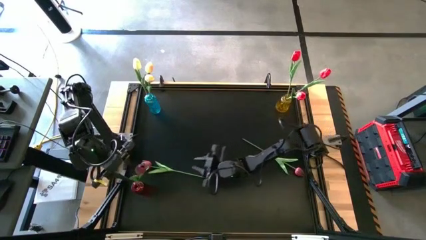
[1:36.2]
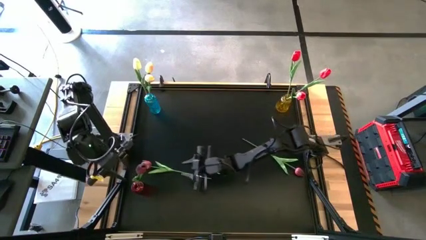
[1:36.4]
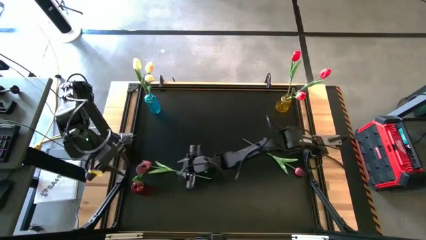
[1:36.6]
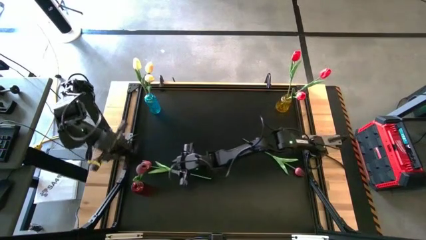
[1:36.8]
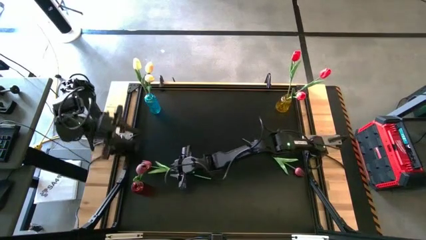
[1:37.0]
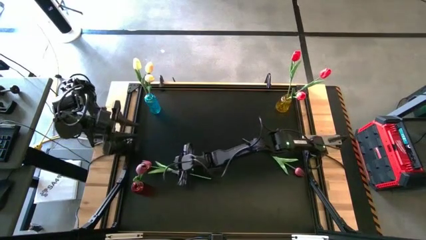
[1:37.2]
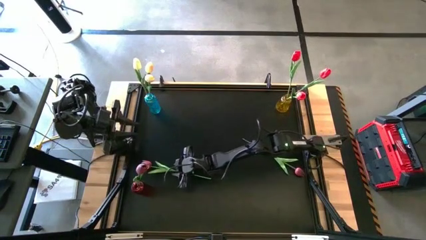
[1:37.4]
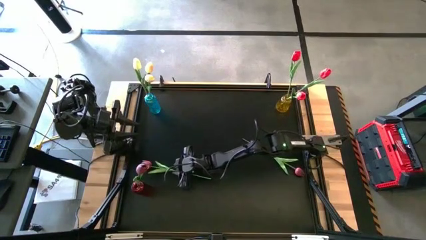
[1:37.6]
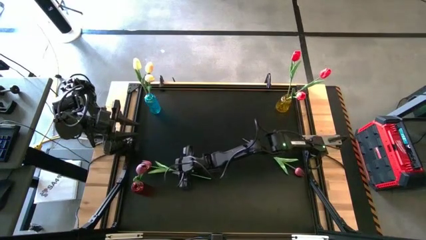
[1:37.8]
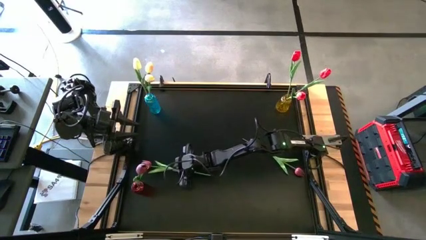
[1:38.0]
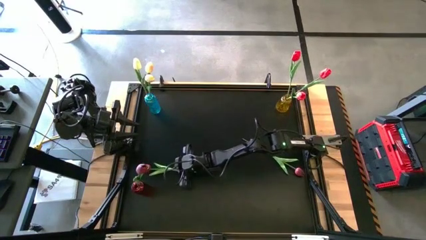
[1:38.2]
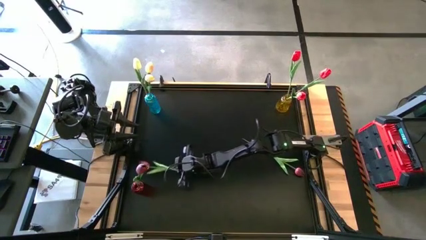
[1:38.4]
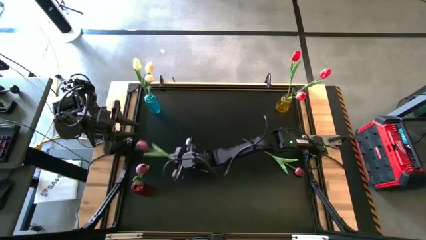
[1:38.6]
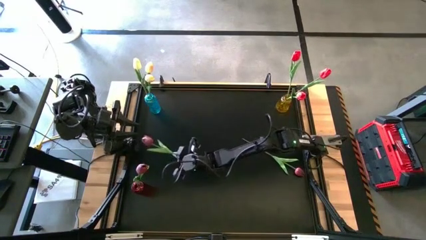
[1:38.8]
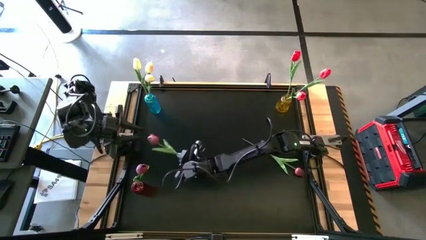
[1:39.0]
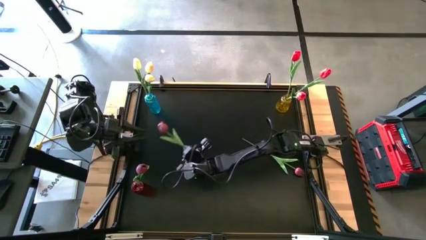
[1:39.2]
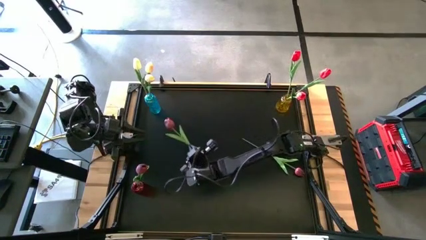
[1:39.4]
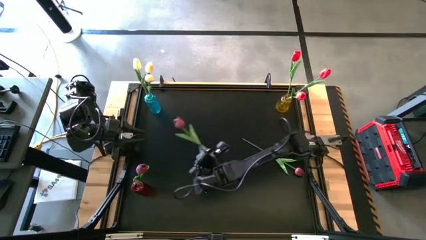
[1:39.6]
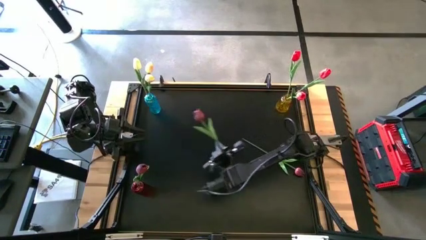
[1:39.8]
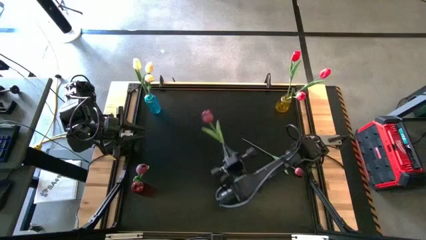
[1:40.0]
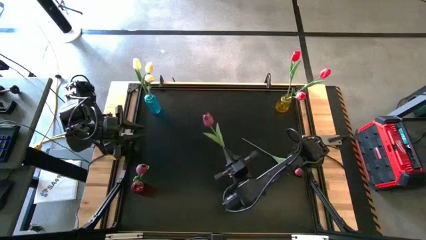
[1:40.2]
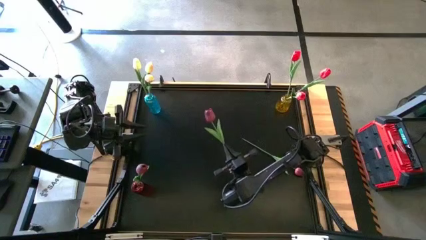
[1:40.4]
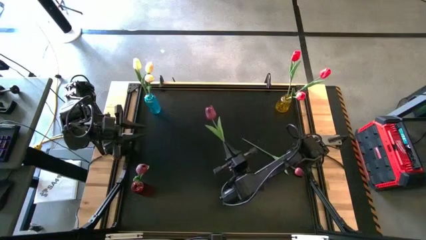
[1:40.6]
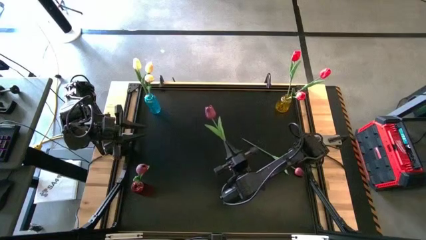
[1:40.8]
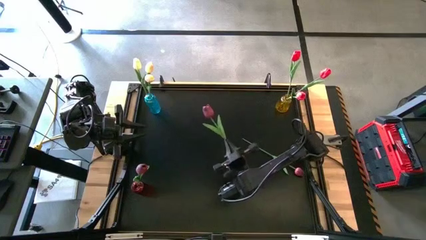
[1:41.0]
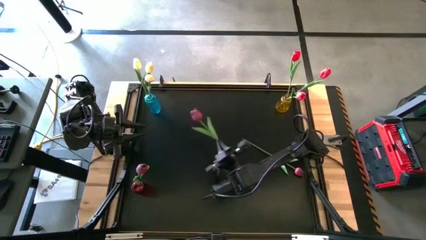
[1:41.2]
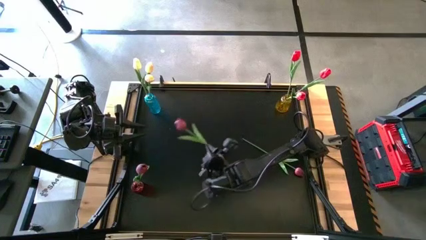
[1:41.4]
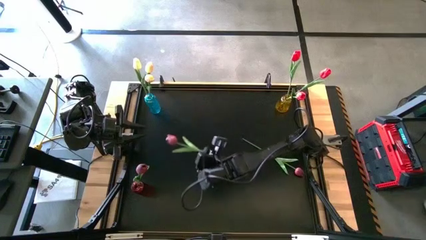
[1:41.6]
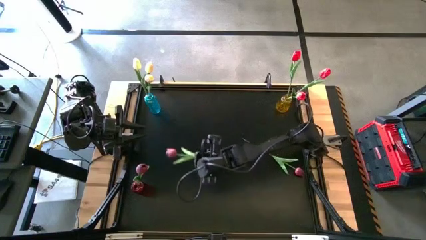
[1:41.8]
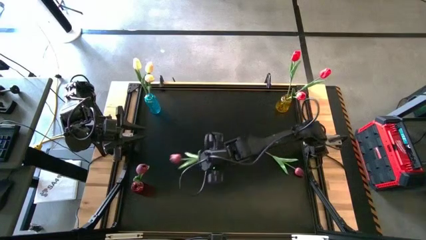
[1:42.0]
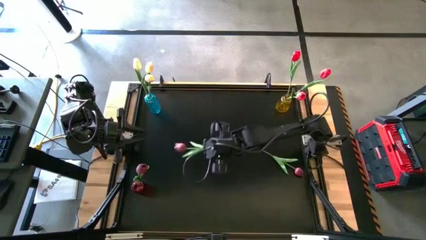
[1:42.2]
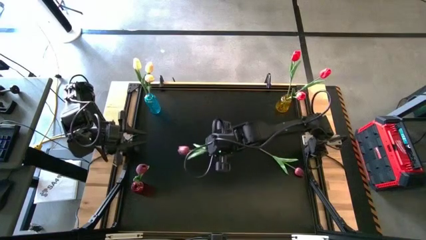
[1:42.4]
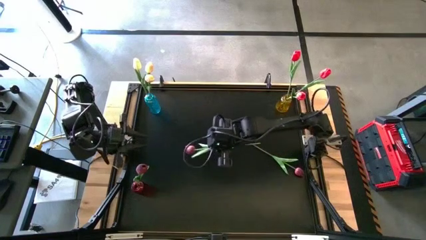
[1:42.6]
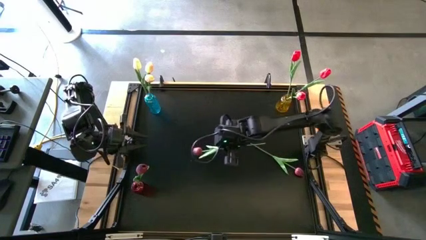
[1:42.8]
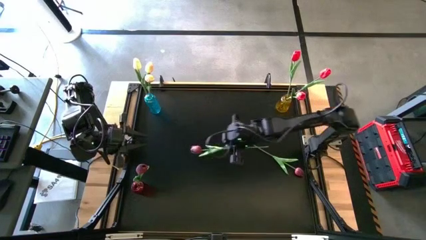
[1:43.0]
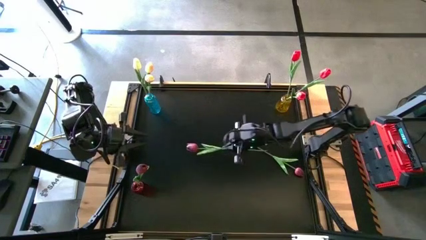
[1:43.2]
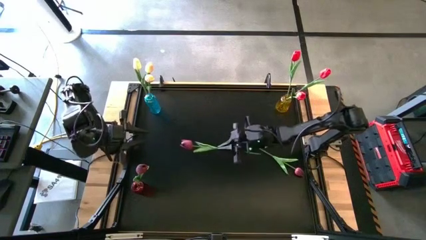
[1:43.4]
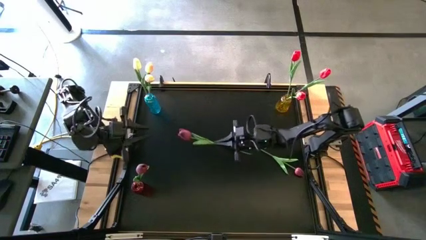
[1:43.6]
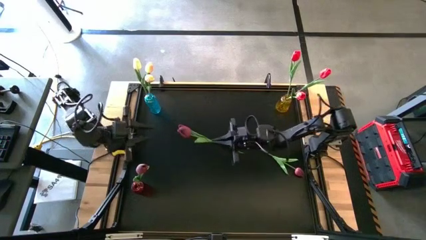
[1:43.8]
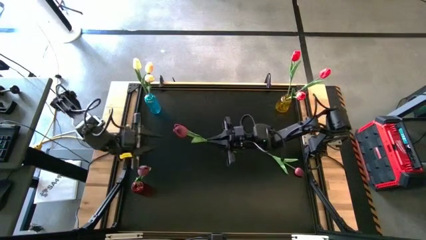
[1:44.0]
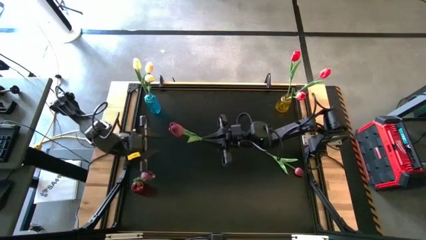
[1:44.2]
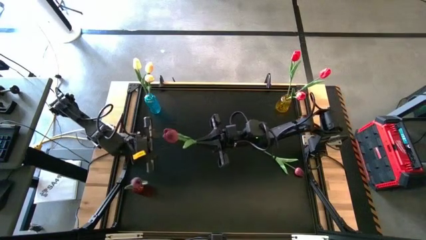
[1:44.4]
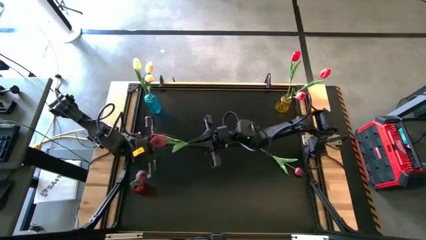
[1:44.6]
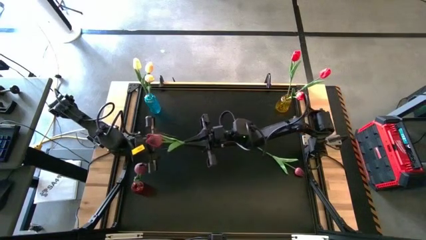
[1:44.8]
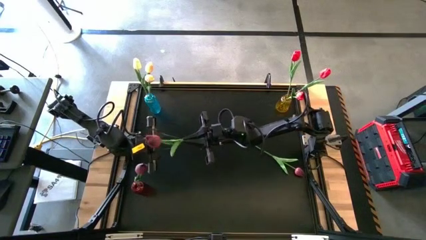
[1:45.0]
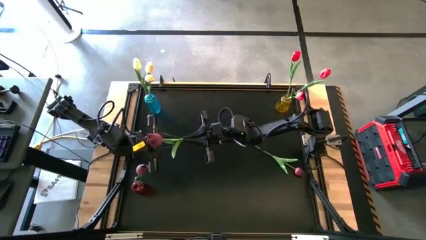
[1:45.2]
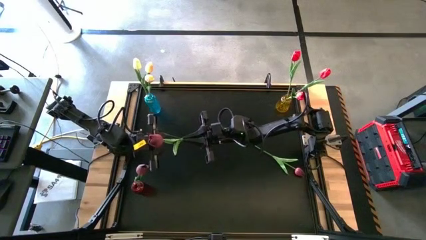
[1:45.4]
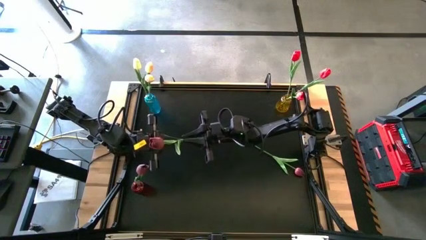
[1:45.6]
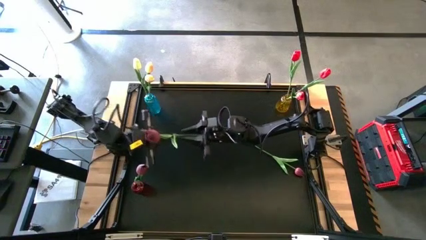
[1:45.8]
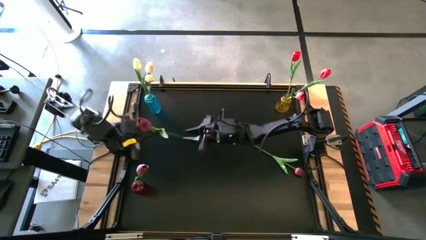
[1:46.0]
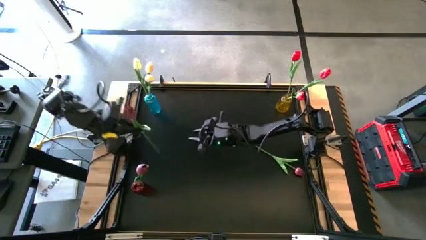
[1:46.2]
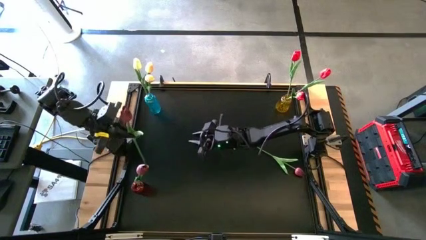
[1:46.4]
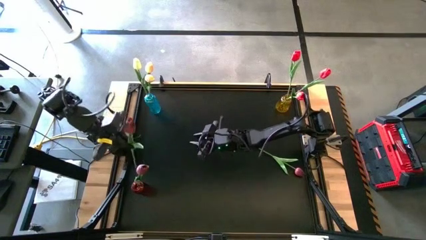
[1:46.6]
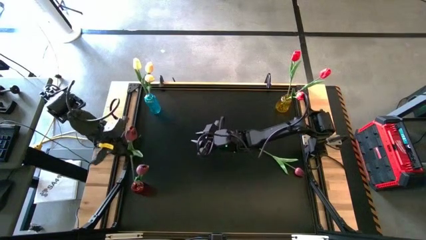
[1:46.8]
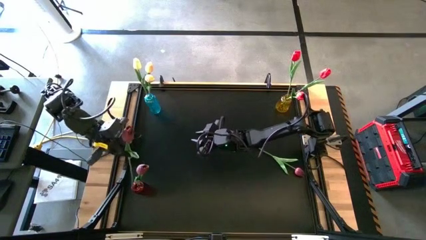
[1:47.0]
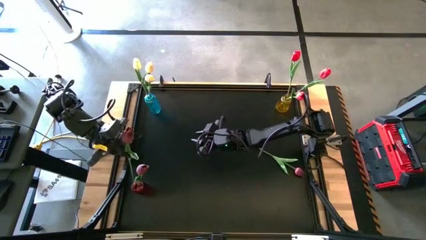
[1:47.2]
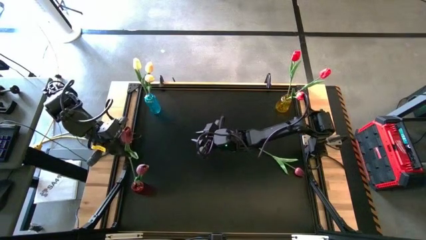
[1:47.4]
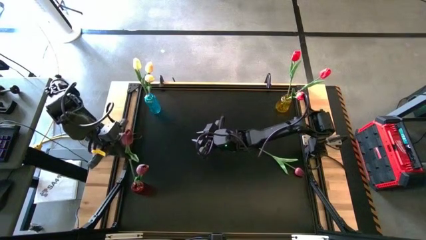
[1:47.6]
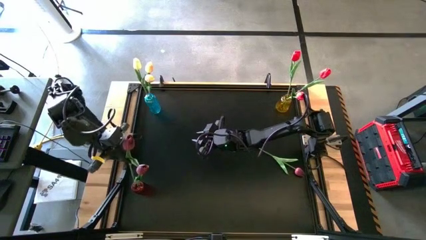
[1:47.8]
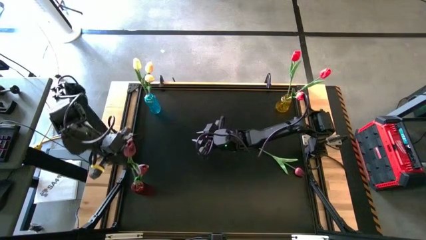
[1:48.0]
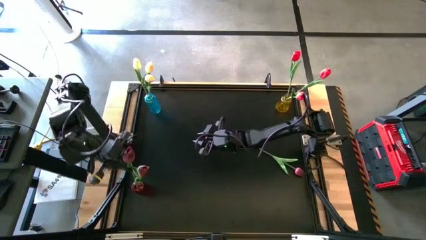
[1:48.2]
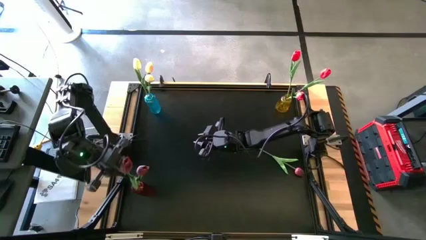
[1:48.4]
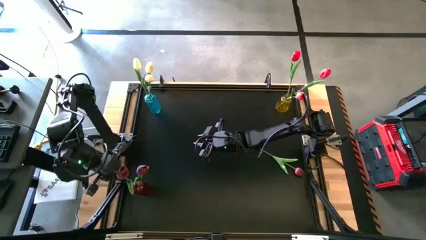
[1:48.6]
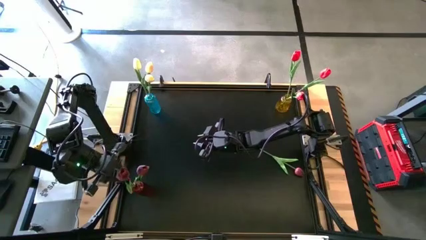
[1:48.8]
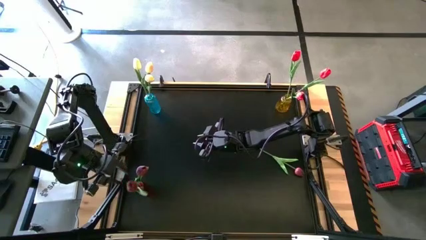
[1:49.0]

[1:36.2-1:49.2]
Task: Sort flowers into vase by color
Put the left dark red tulip into the red vase

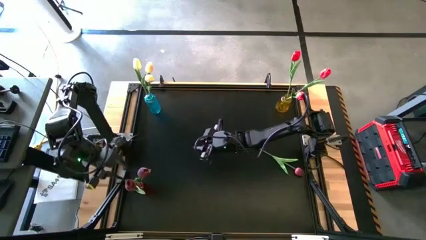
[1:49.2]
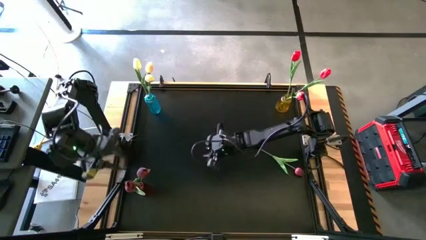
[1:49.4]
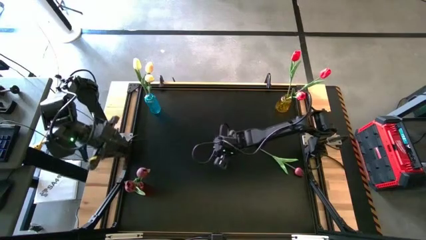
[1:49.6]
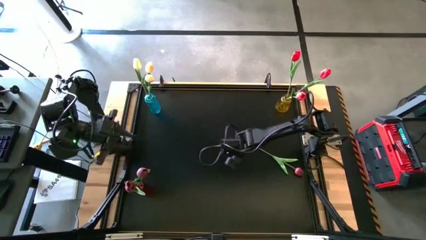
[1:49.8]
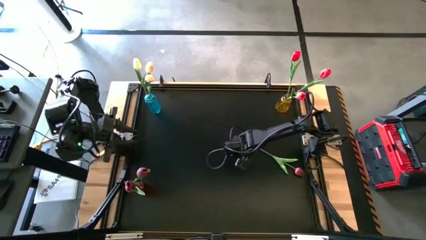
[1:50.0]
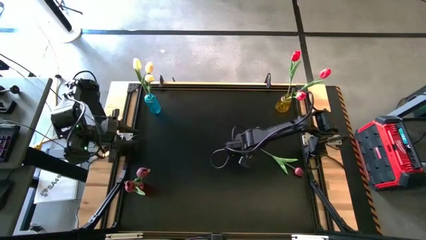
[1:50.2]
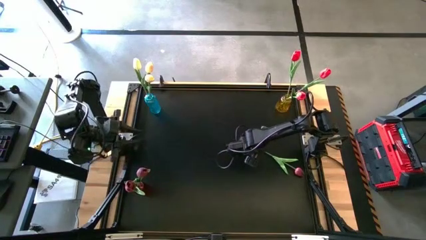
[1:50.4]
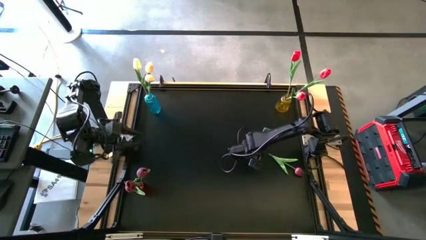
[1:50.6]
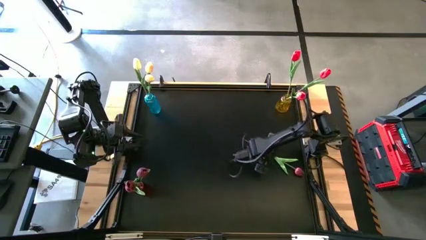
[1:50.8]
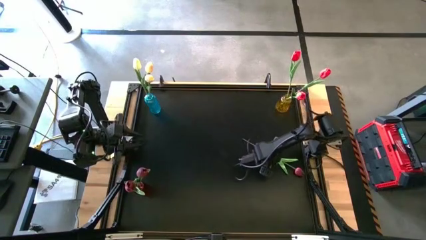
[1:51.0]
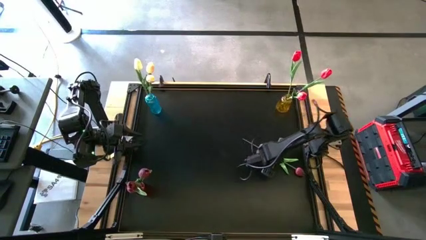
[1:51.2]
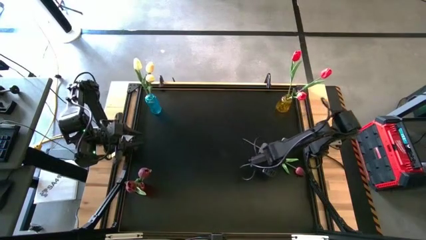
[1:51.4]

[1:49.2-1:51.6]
Put the dark red tulip into the red vase
